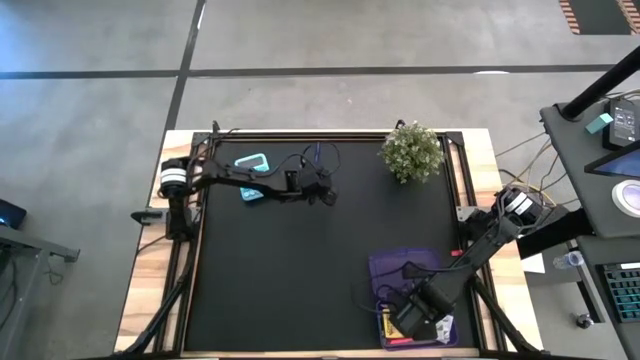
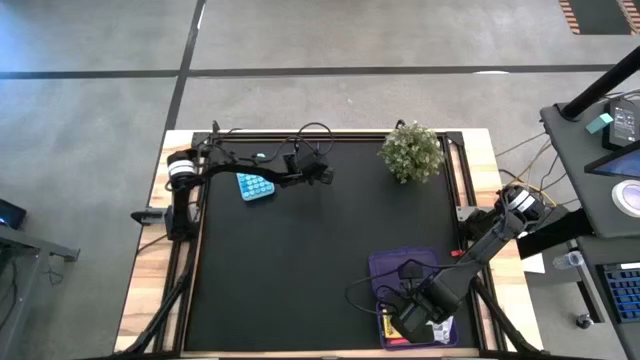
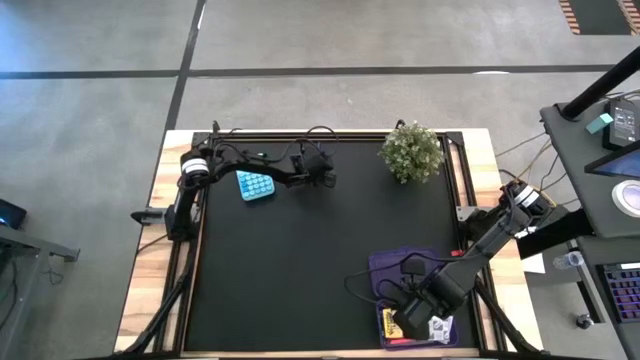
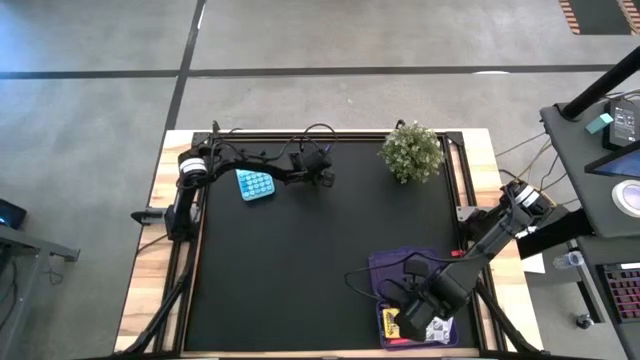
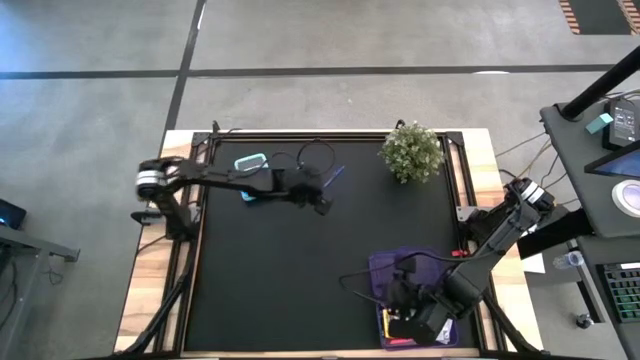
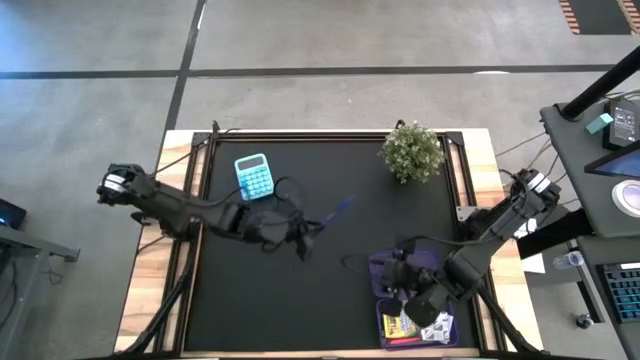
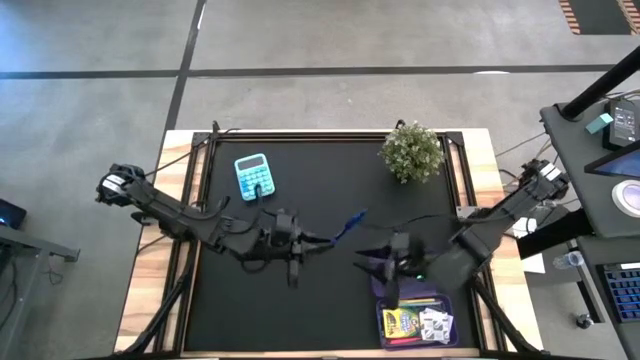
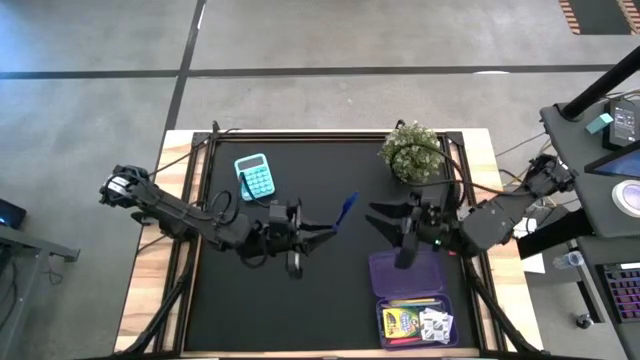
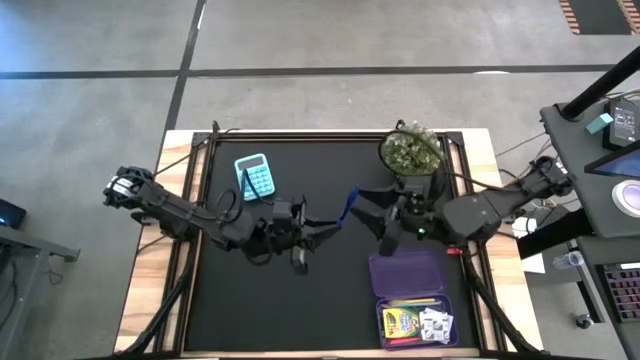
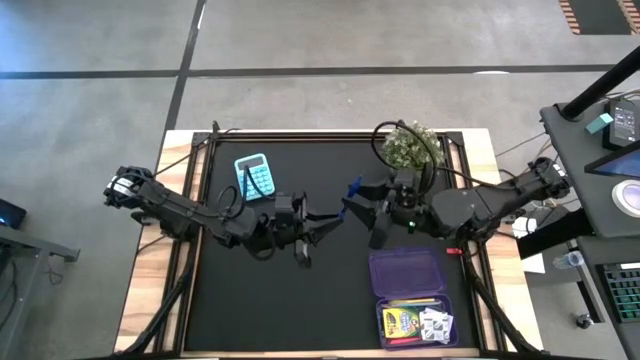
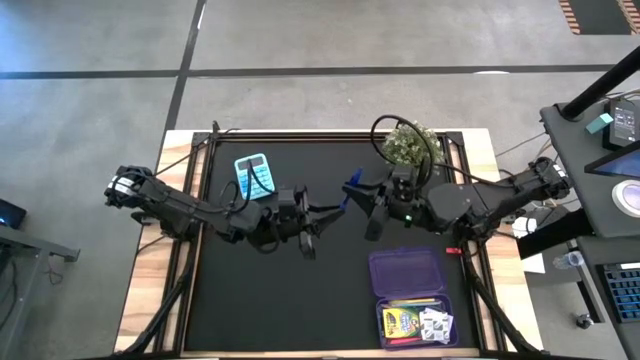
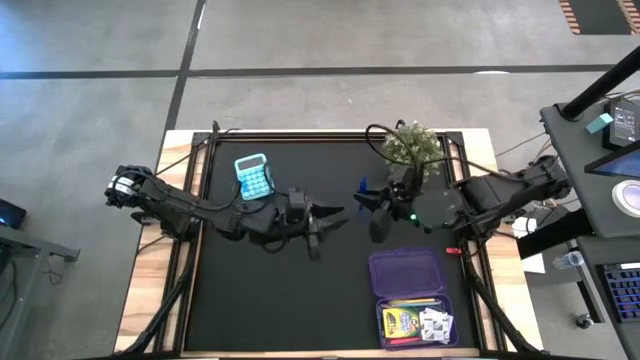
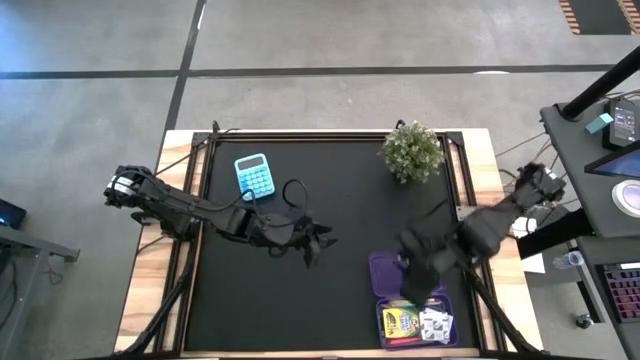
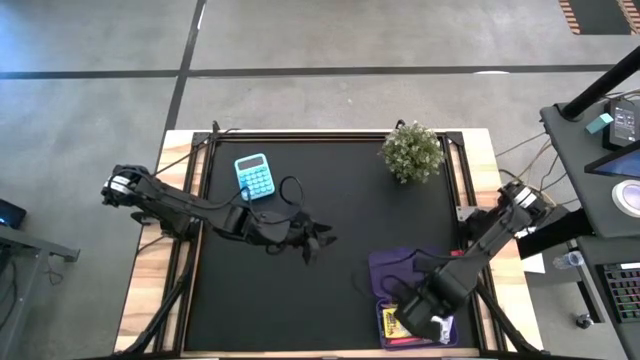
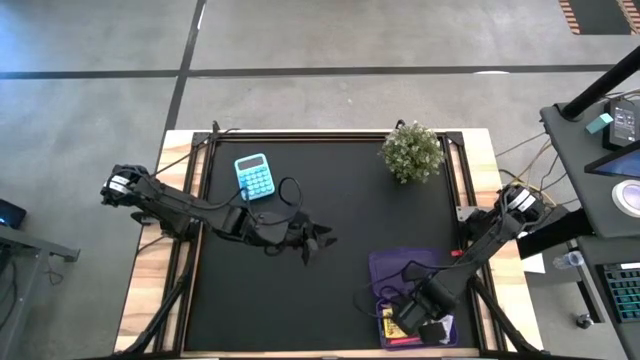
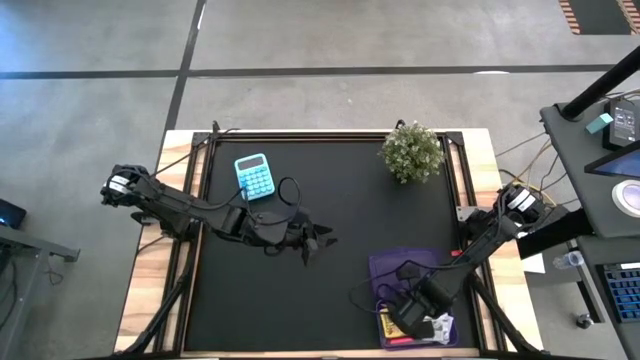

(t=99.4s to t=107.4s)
Task: Pack school essentials
Put the blue pen into the purple supply box

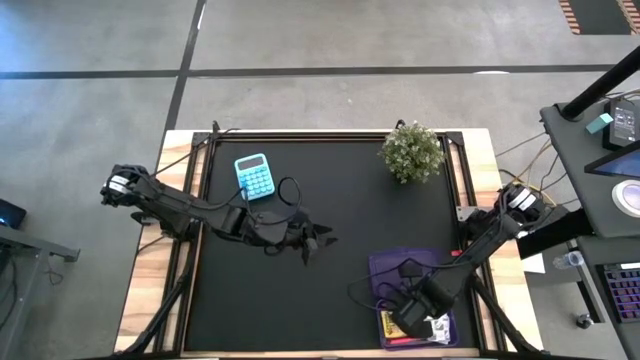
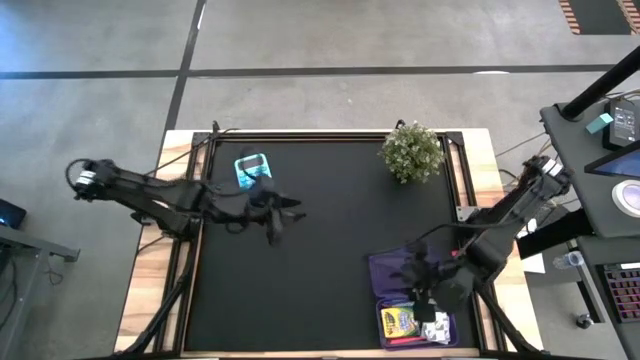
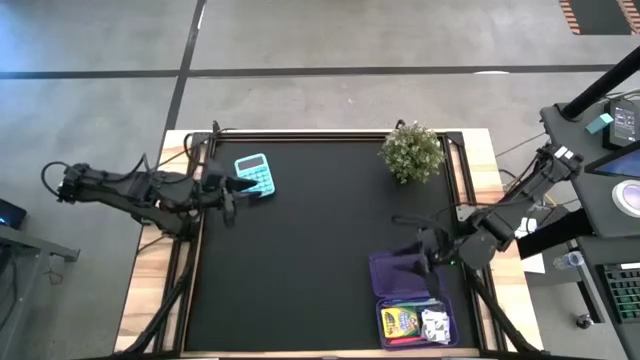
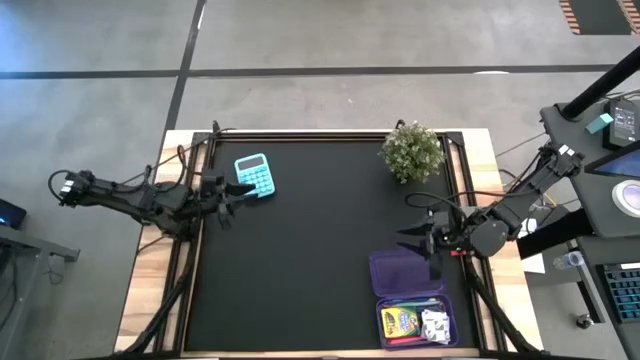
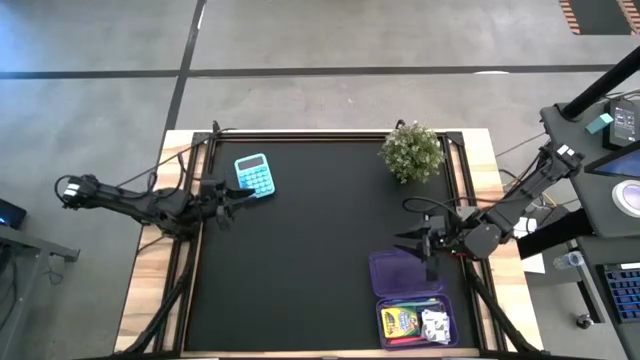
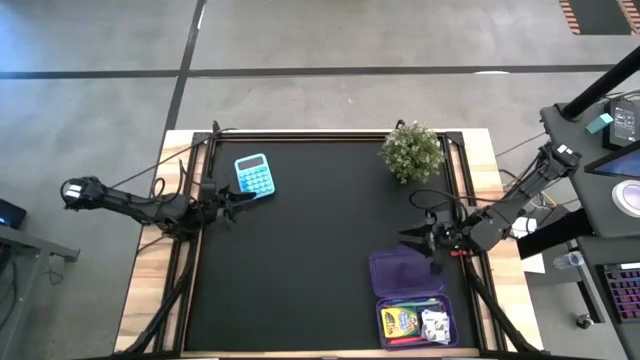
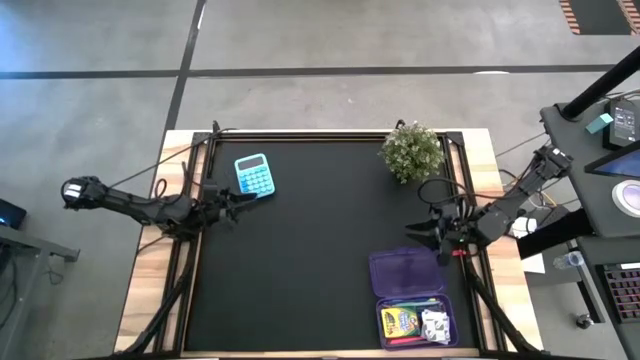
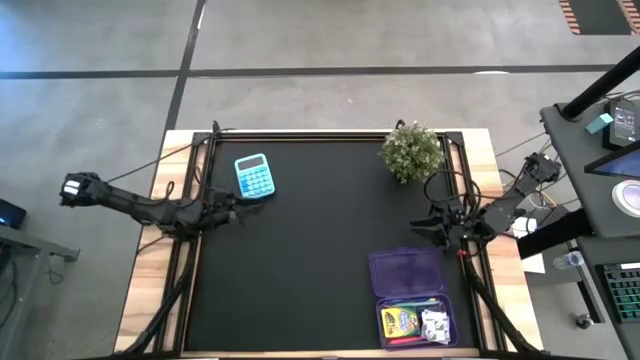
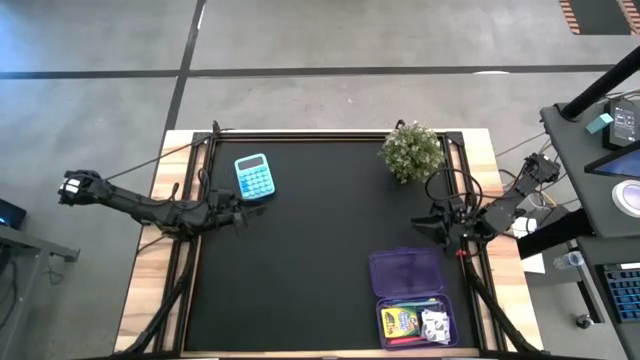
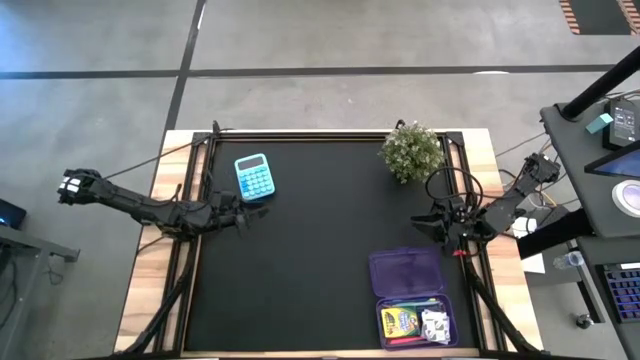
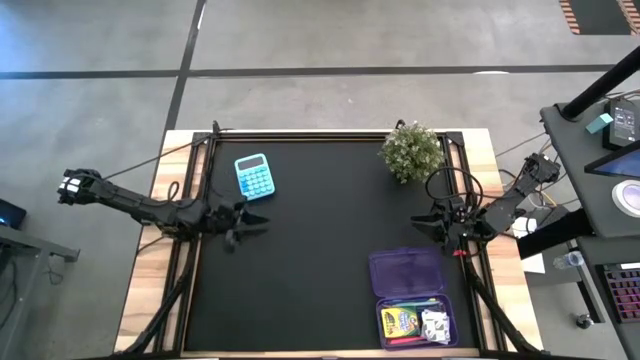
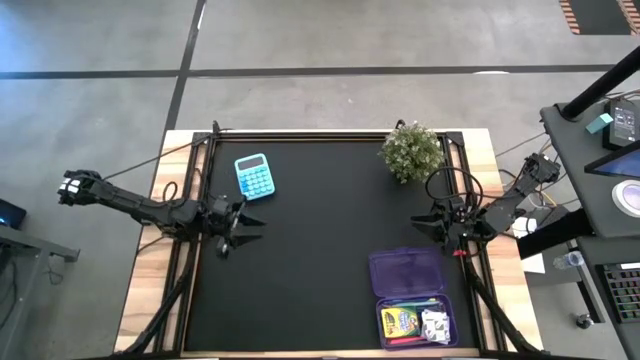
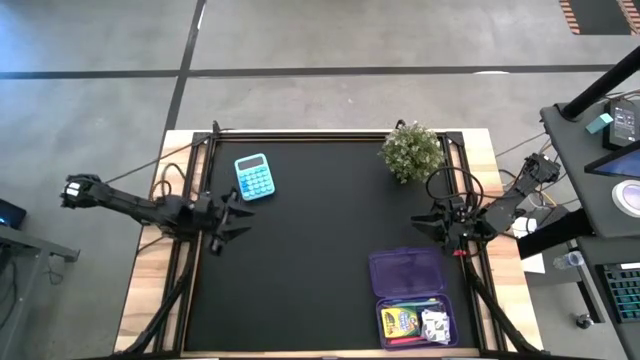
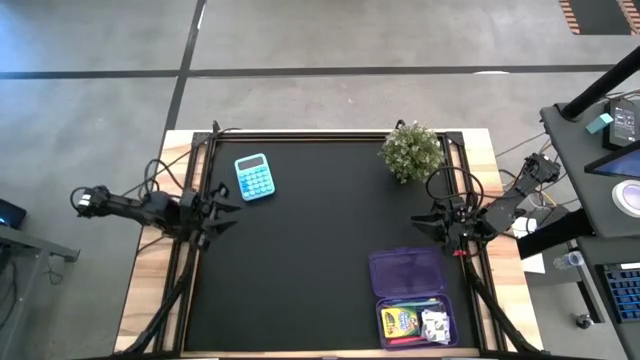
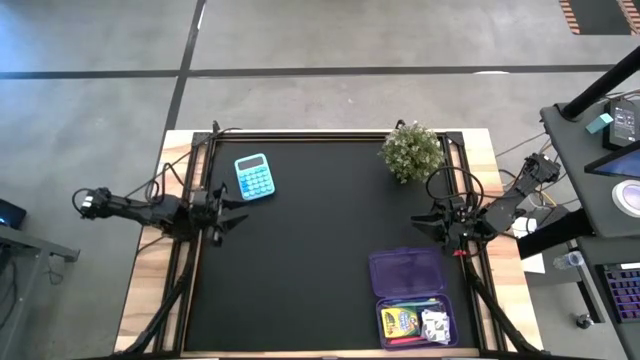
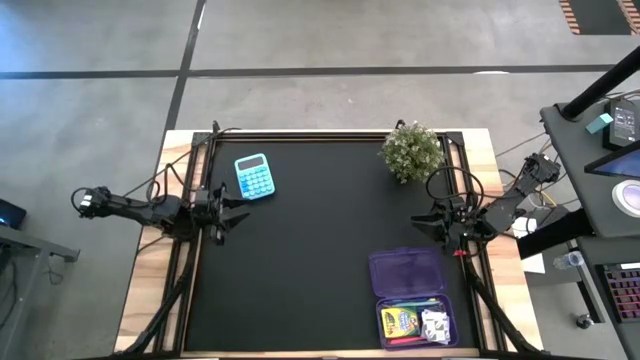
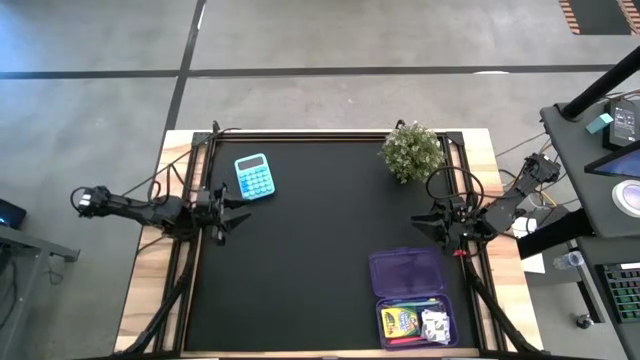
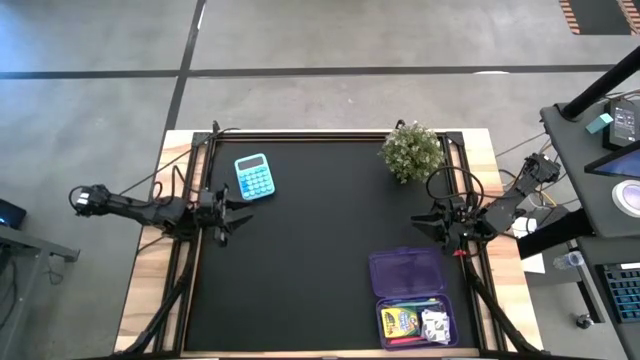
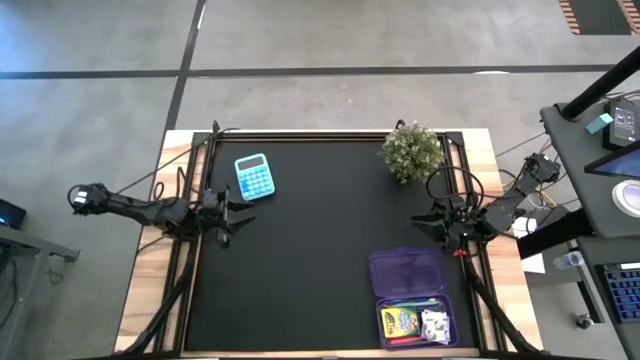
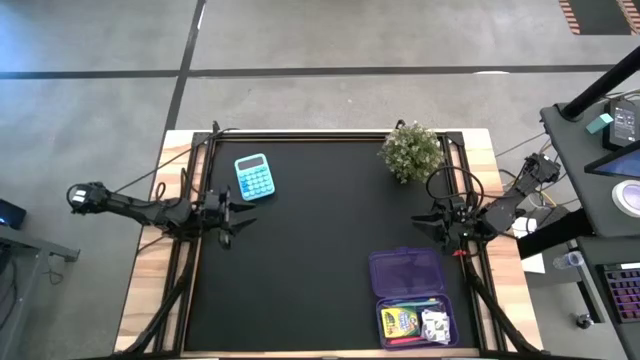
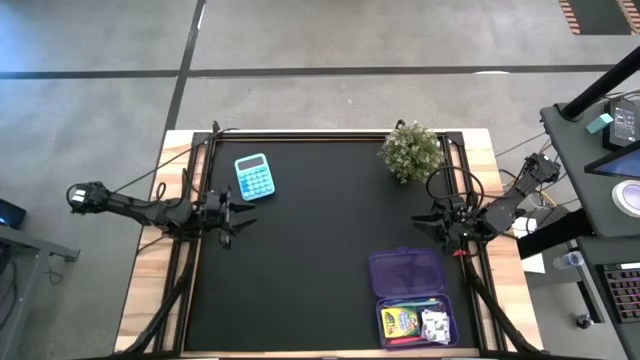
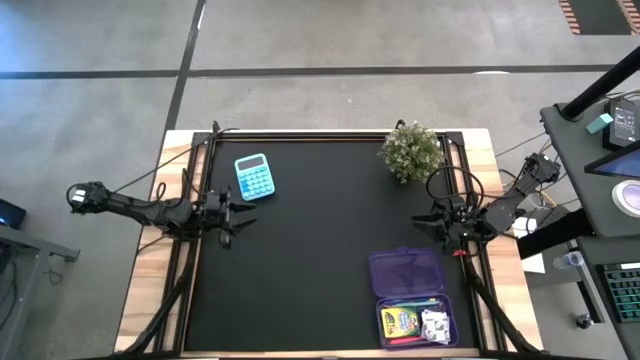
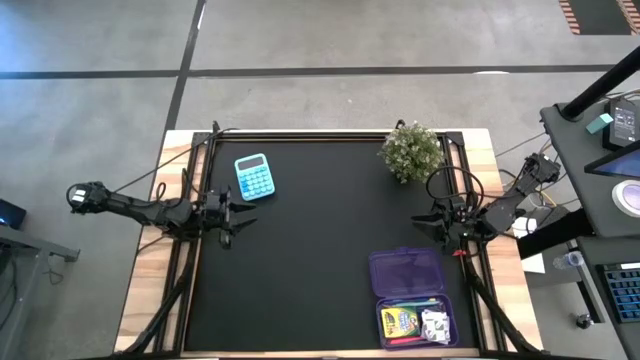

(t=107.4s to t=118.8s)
Return to Home Position

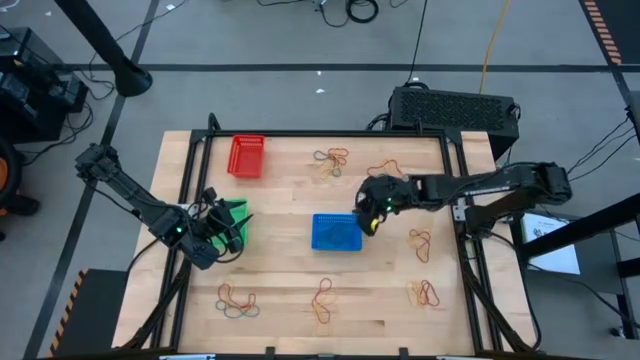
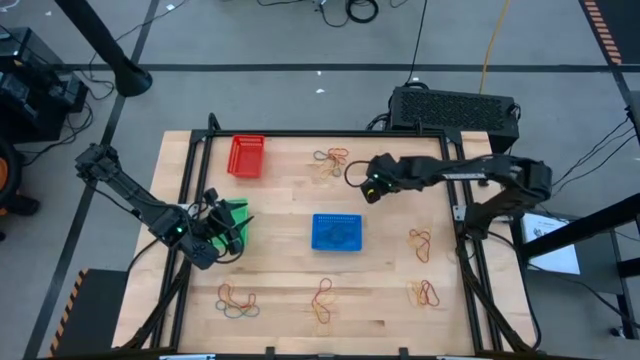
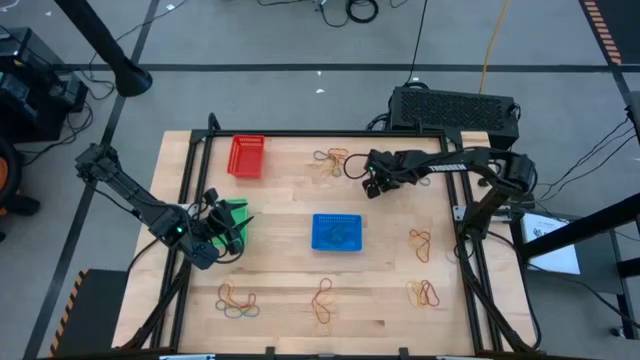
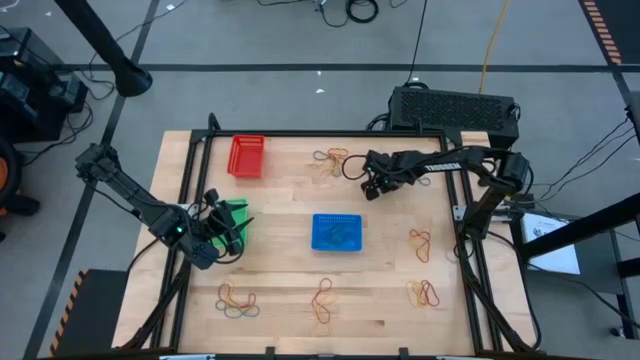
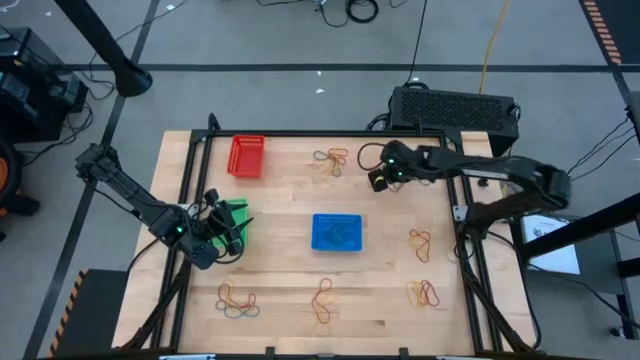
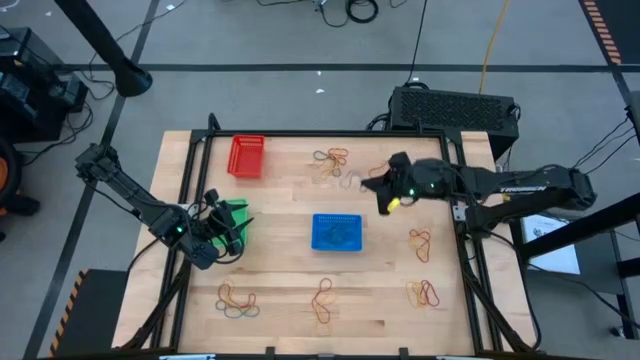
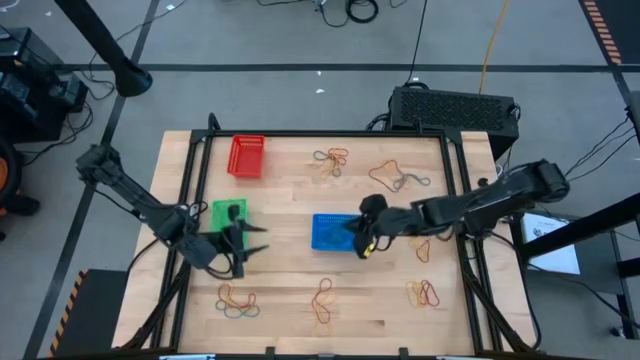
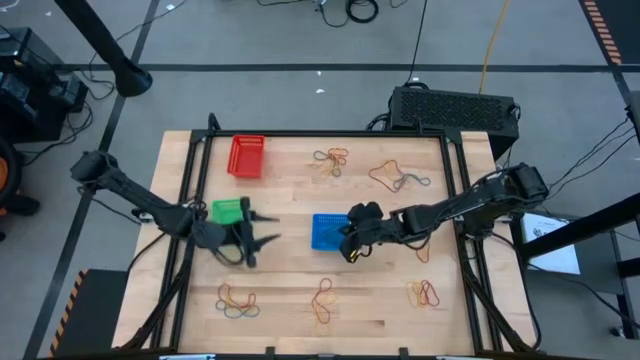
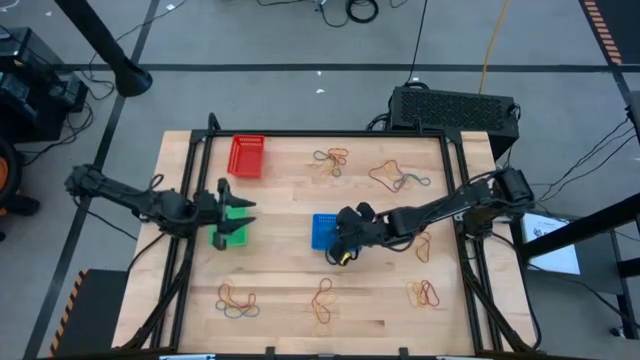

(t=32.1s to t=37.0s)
Task: Sort rubber bands into baskets
Put the blue rubber band into the blue bin
